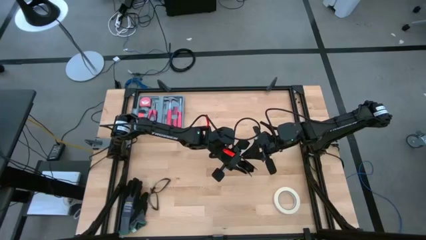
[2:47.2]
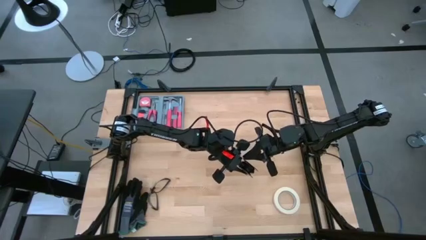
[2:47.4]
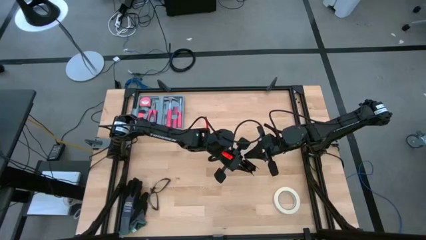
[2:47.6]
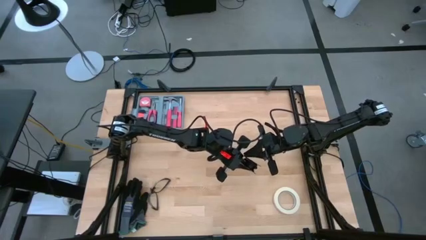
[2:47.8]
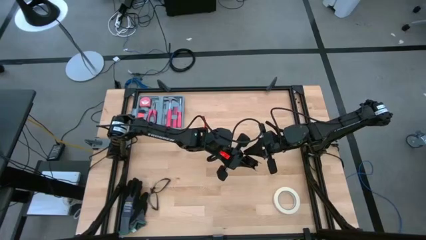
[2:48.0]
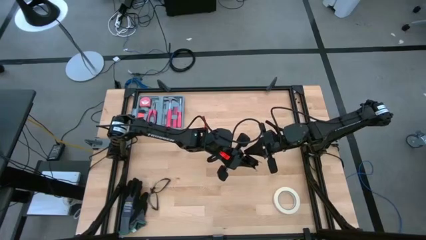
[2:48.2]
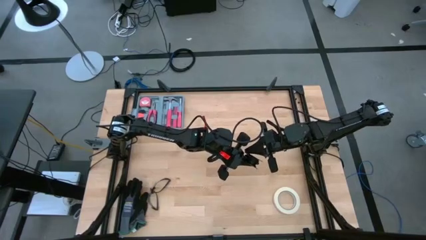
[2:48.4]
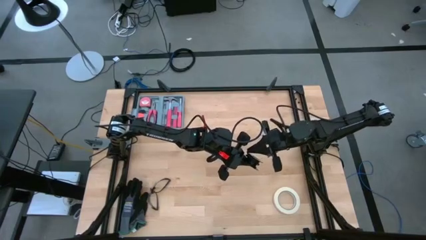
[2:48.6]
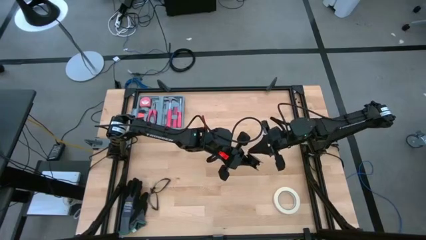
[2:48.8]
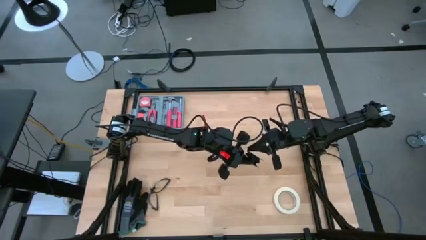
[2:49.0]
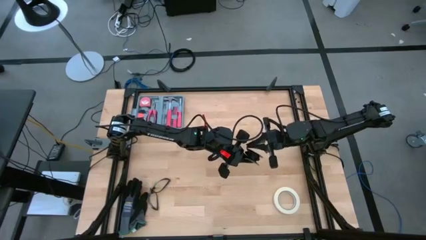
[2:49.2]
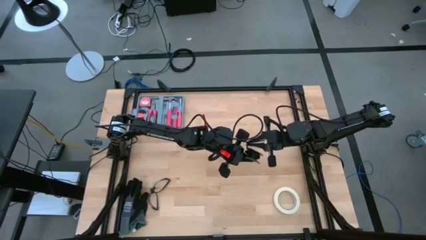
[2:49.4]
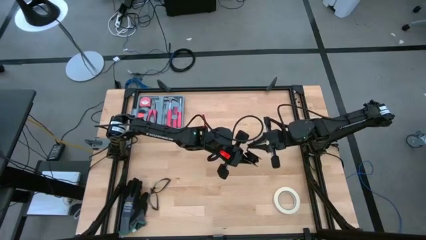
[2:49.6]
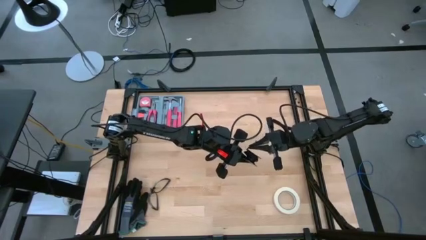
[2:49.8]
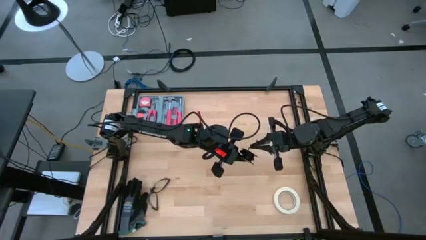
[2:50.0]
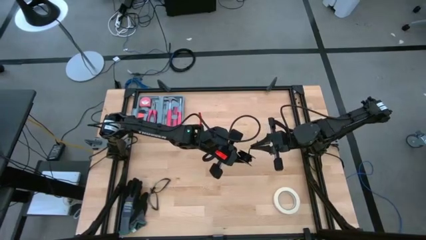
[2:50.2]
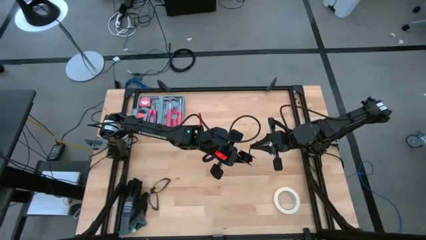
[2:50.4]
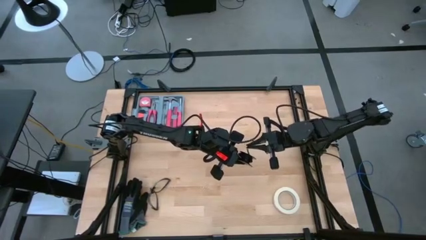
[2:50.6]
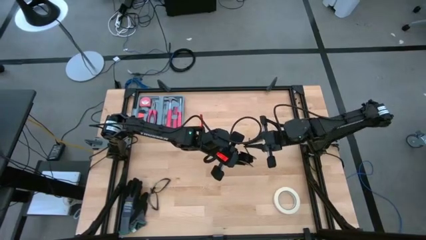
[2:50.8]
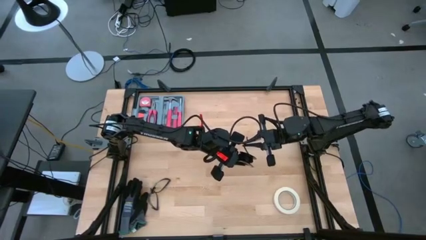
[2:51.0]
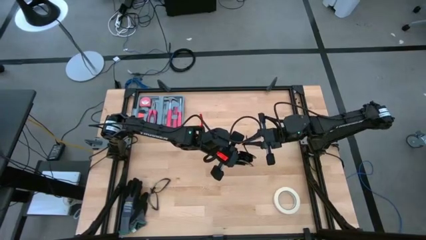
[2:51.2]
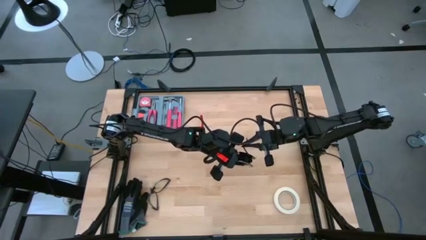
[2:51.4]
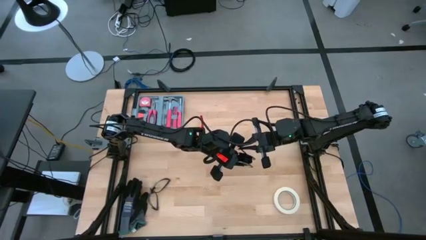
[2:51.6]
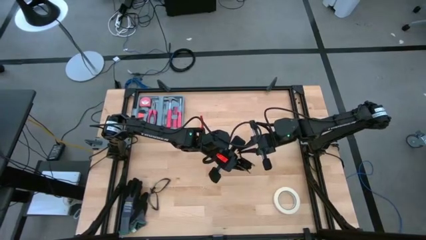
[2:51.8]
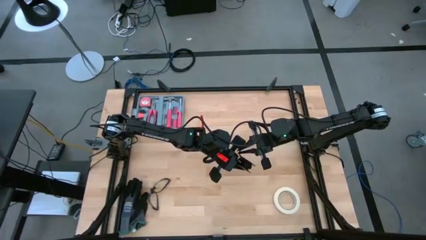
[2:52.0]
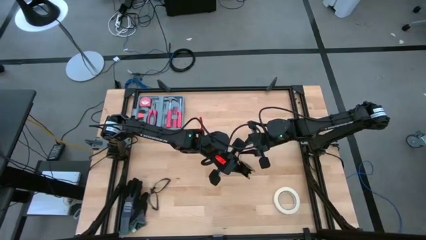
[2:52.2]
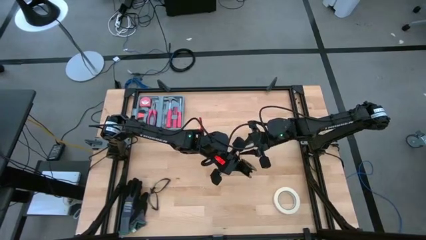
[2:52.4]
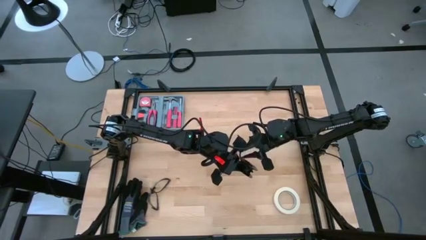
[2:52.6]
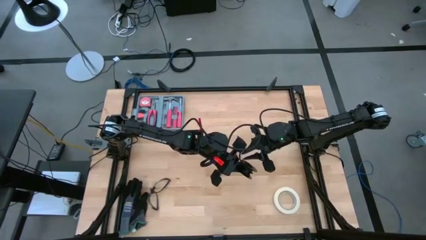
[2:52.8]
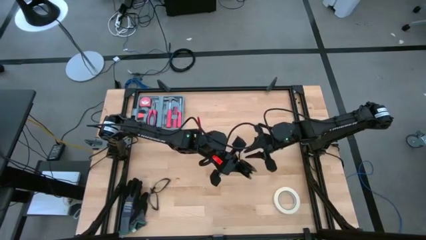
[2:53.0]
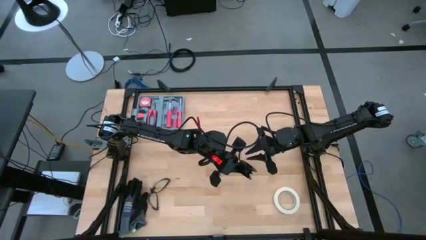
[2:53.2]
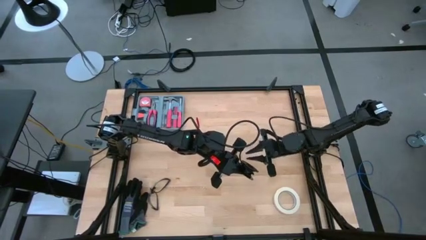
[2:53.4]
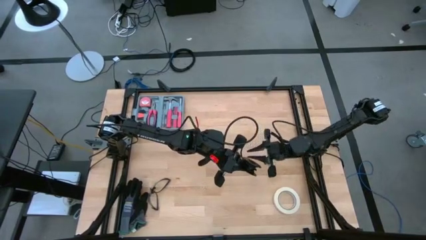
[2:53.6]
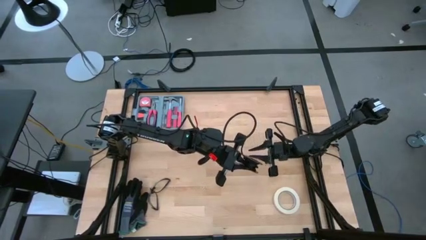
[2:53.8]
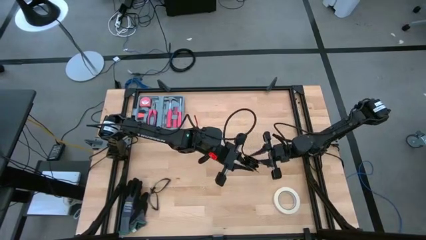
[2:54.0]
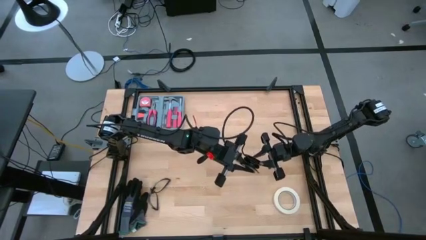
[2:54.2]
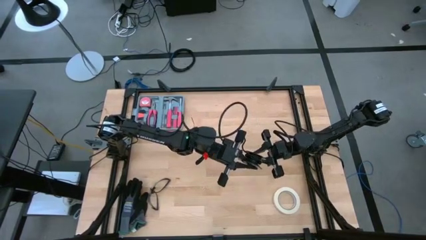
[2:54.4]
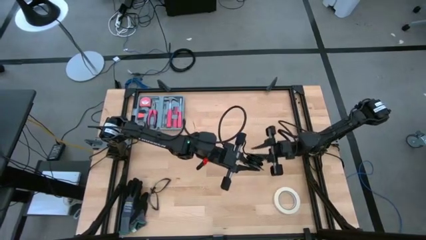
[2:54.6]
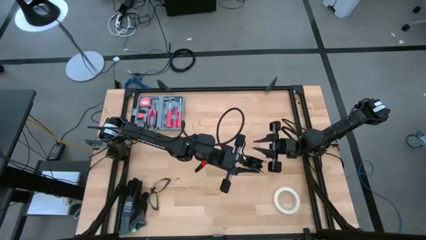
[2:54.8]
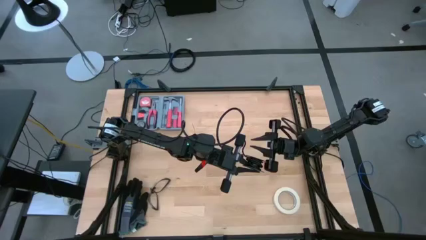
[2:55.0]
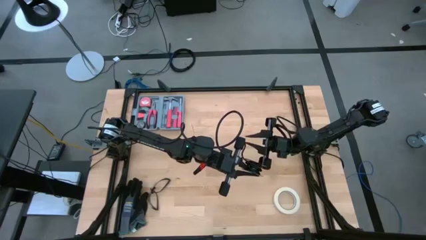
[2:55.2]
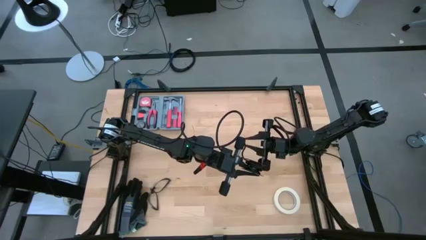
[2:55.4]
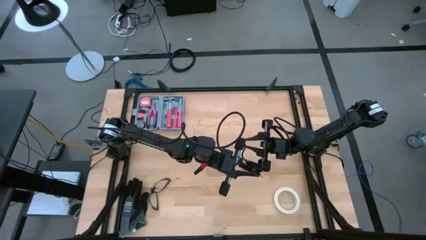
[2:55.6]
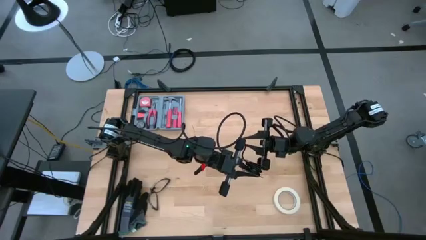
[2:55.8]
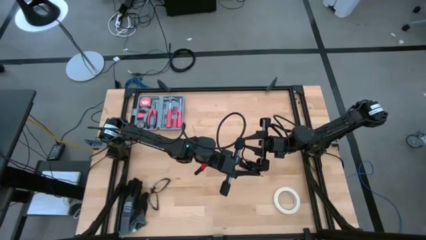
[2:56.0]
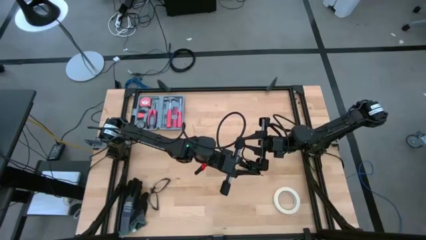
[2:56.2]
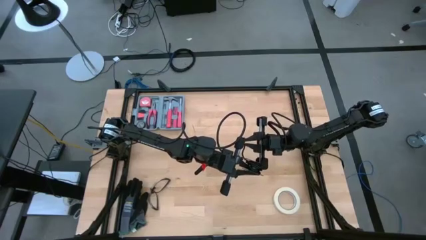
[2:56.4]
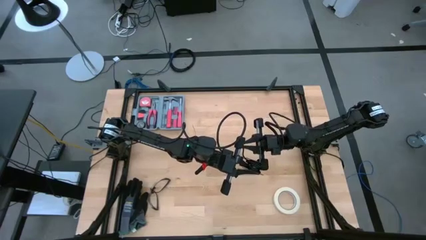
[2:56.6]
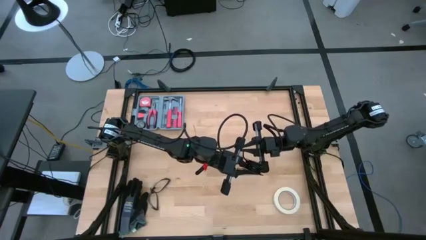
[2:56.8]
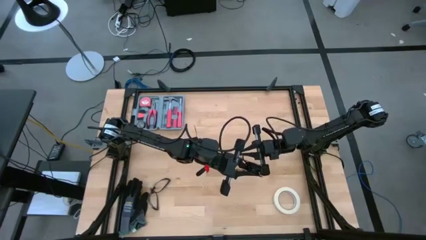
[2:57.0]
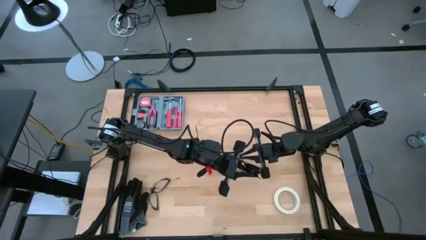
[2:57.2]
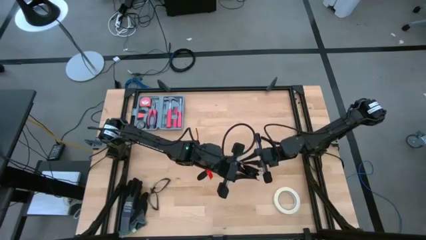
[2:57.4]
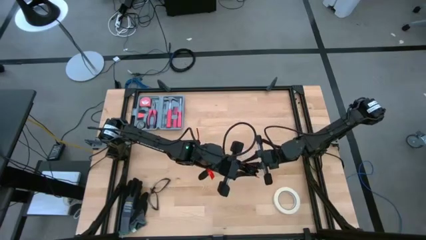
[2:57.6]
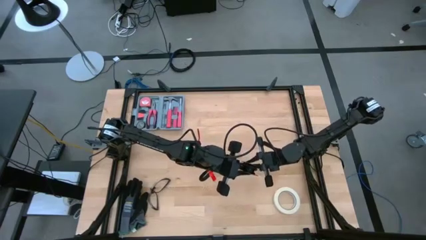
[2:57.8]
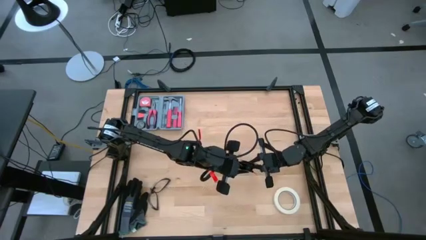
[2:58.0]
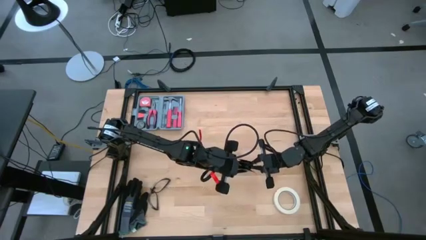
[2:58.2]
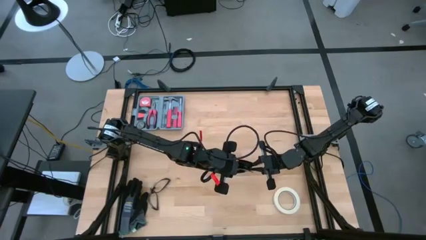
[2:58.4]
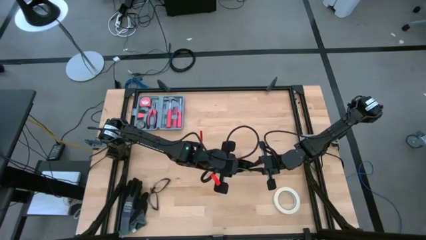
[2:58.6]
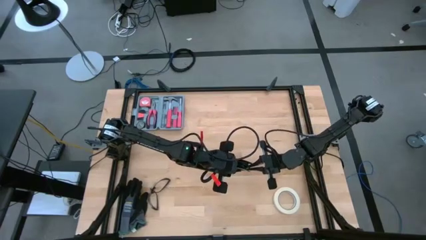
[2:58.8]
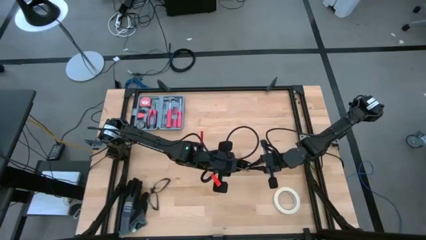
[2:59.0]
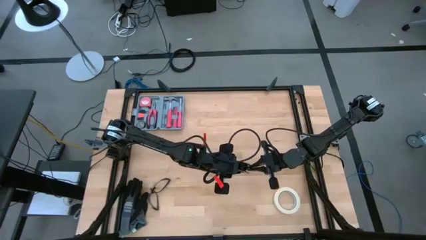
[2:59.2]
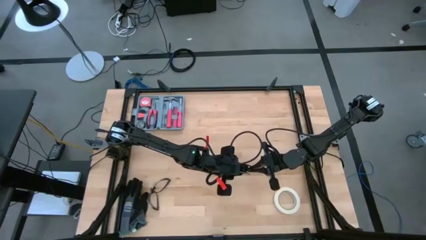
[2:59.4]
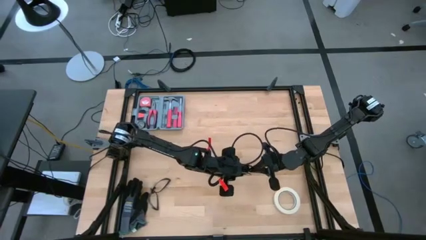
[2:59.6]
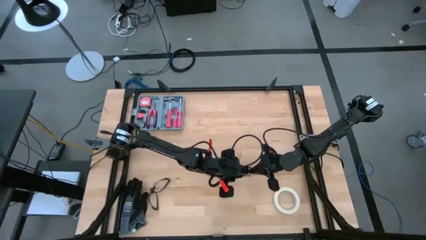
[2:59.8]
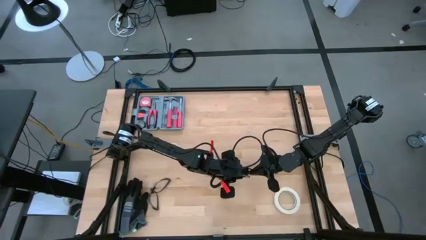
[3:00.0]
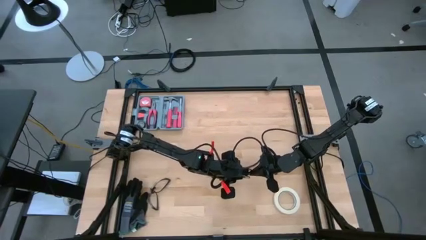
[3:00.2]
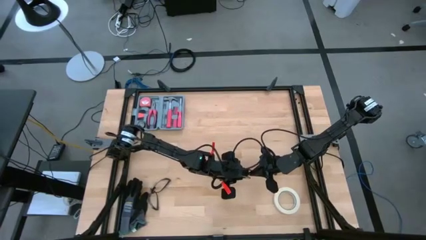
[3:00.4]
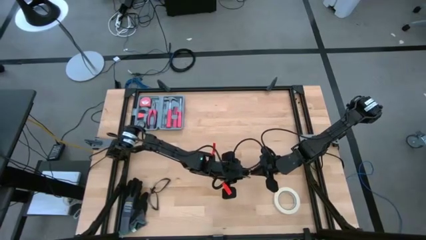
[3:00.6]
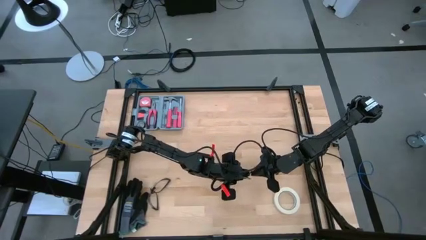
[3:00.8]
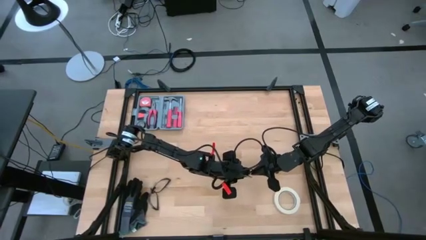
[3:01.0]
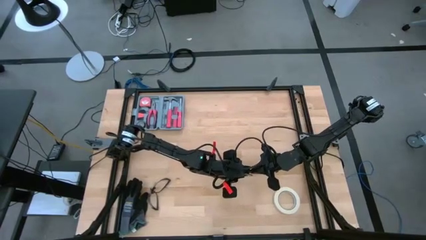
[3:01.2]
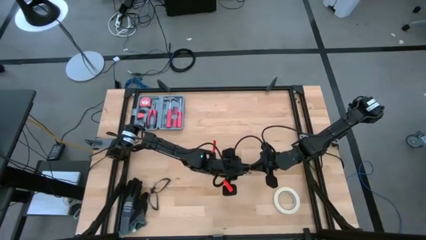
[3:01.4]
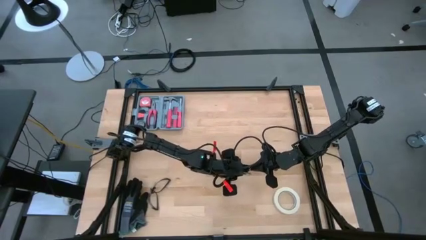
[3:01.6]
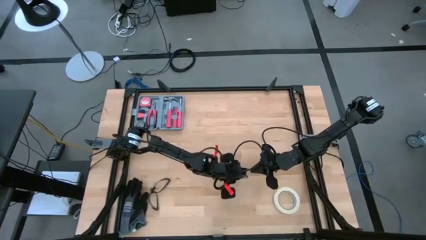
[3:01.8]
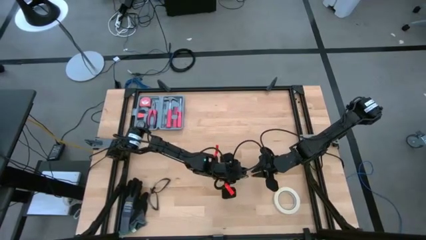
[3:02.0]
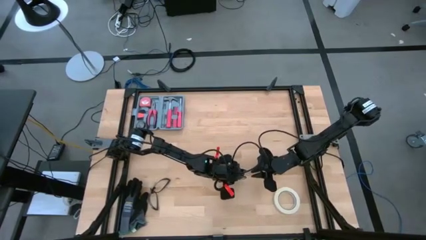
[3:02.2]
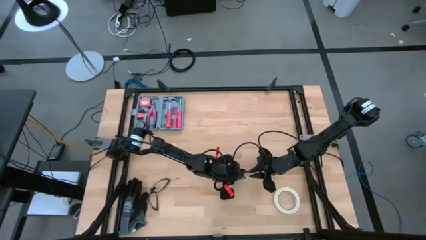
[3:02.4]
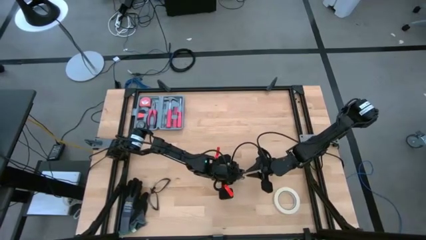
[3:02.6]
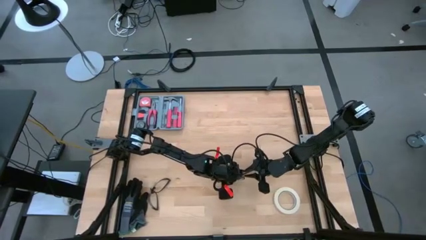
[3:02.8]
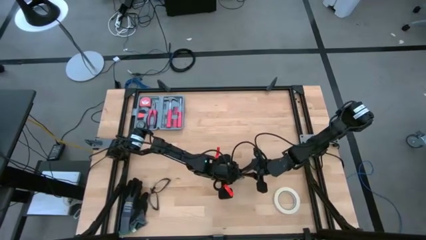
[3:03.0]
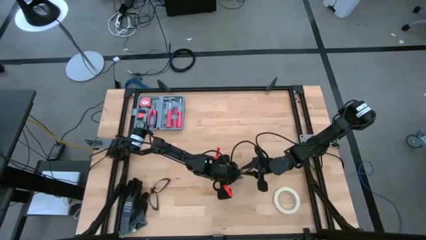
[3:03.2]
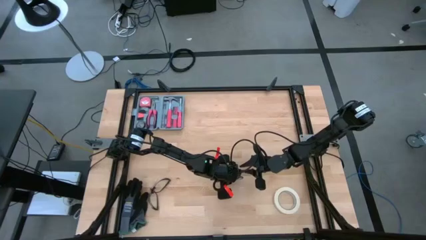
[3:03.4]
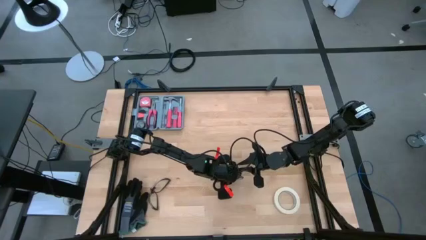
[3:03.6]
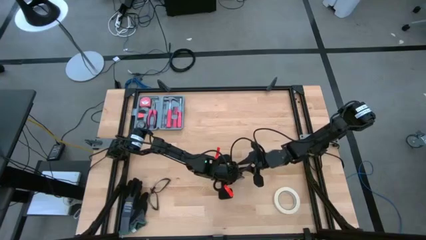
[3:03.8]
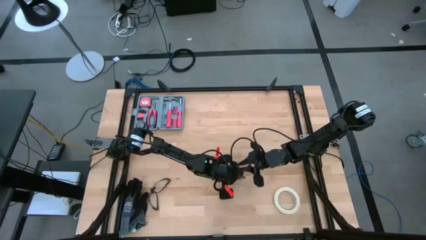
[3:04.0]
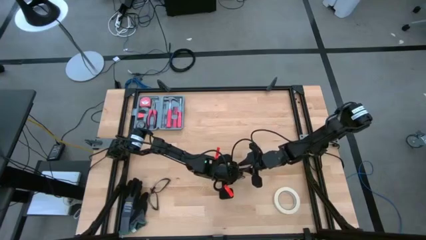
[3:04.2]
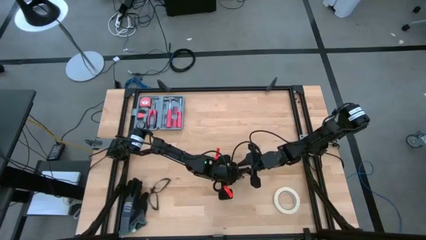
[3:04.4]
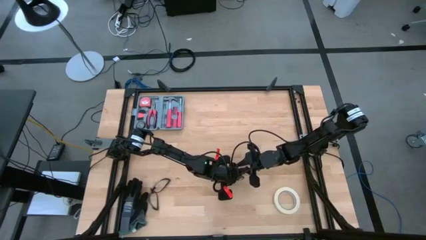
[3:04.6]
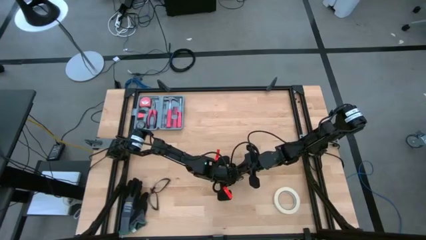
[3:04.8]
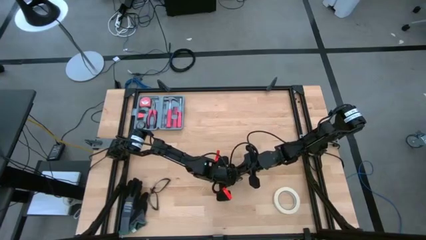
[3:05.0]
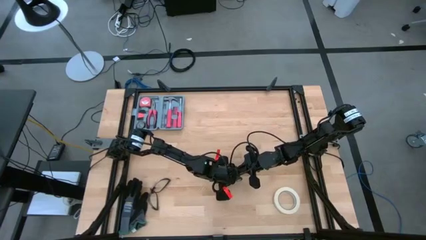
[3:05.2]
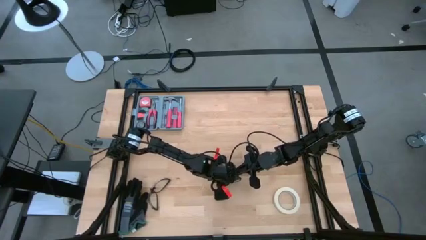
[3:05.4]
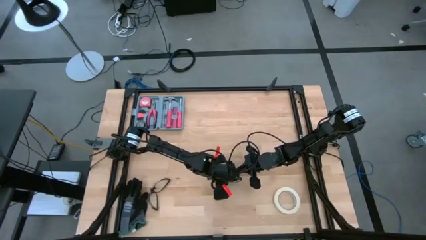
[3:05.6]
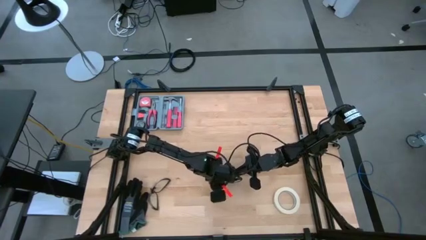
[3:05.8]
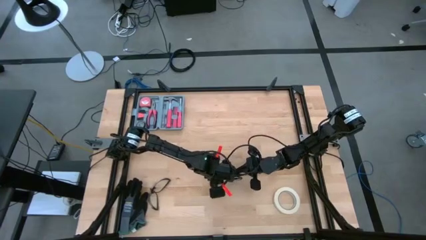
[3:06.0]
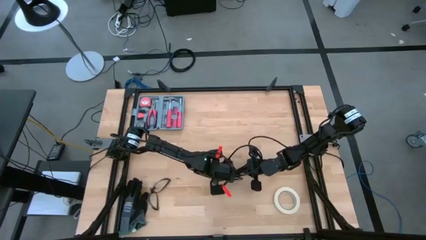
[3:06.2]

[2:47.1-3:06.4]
Task: Coil cords
Coil the black wire onto the spool
